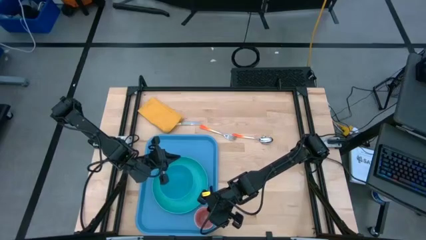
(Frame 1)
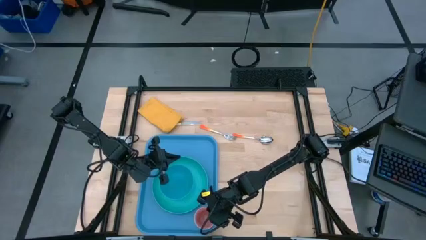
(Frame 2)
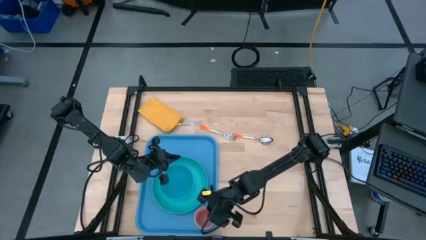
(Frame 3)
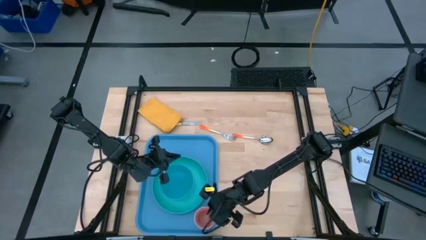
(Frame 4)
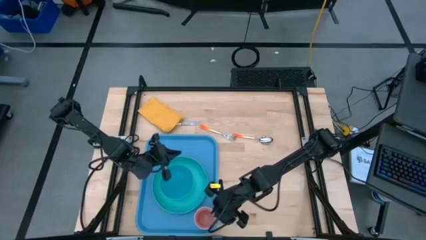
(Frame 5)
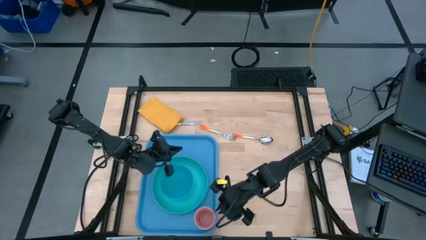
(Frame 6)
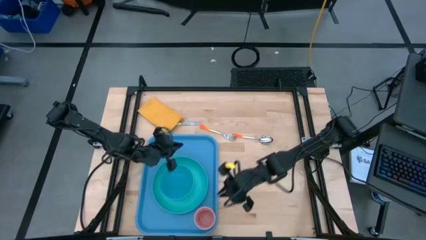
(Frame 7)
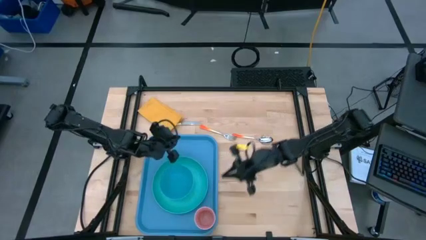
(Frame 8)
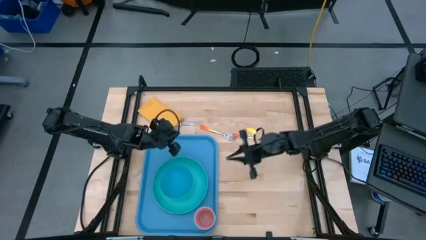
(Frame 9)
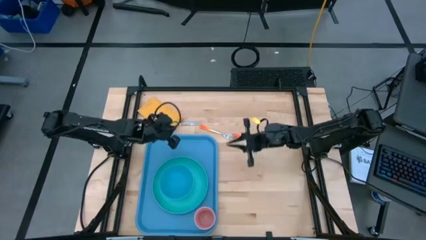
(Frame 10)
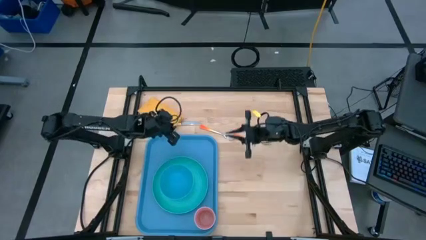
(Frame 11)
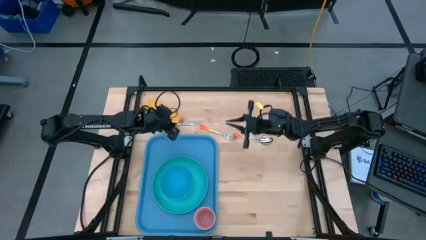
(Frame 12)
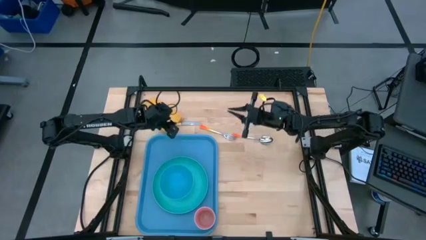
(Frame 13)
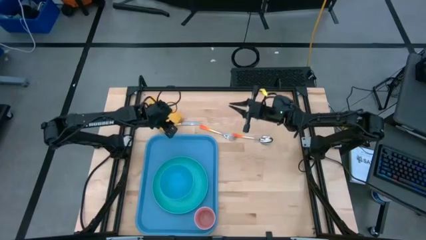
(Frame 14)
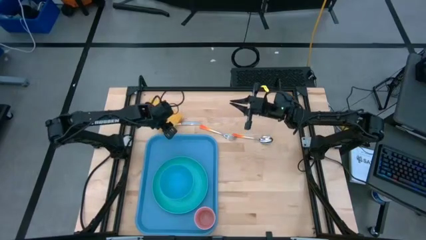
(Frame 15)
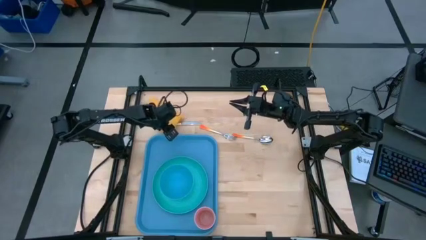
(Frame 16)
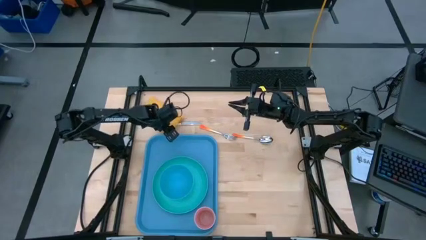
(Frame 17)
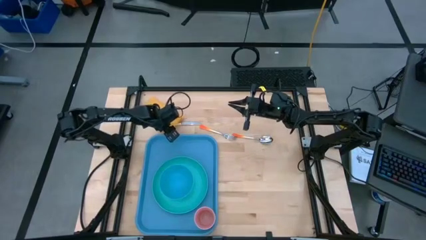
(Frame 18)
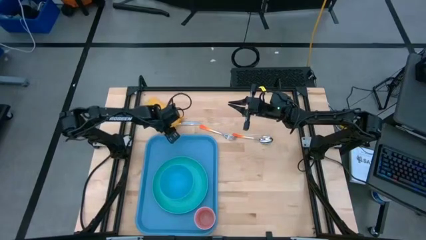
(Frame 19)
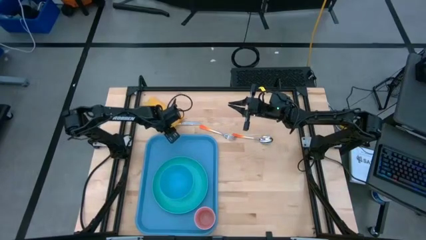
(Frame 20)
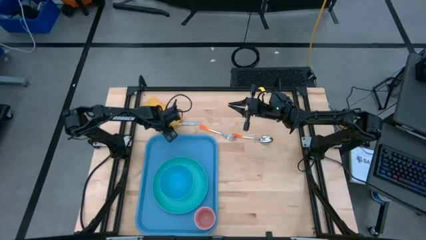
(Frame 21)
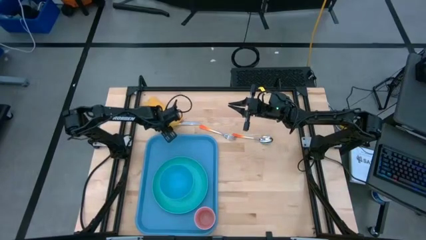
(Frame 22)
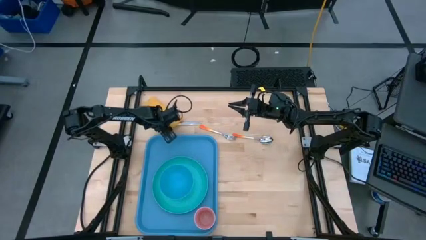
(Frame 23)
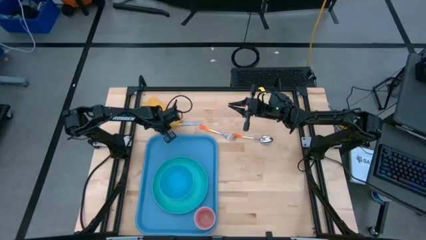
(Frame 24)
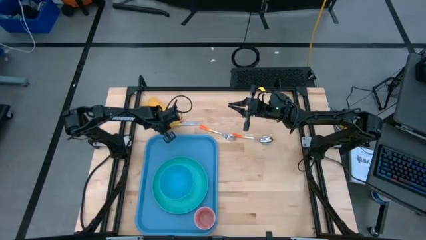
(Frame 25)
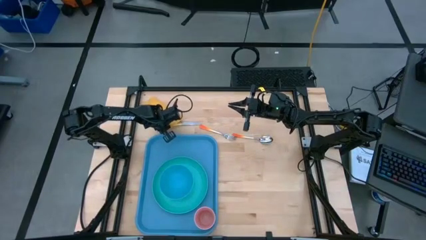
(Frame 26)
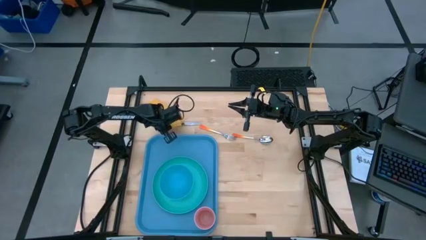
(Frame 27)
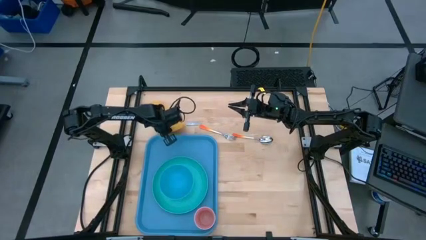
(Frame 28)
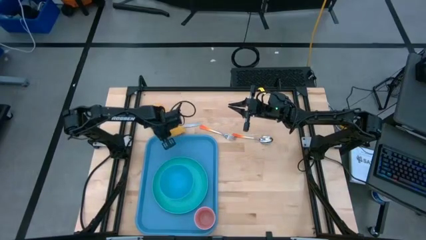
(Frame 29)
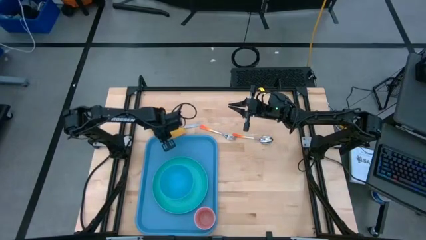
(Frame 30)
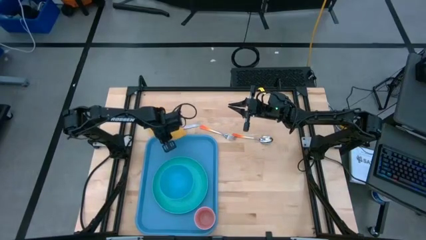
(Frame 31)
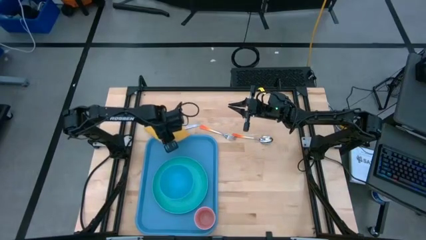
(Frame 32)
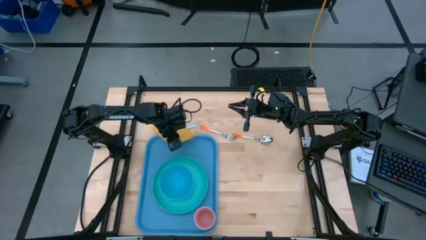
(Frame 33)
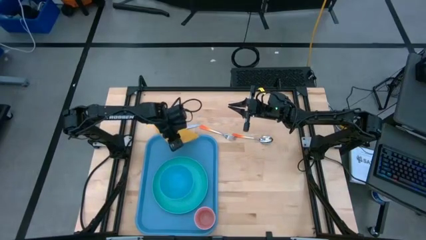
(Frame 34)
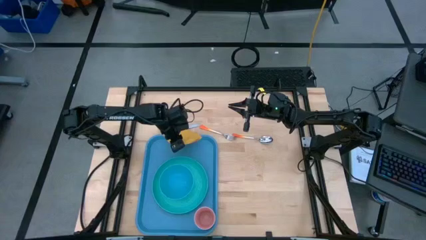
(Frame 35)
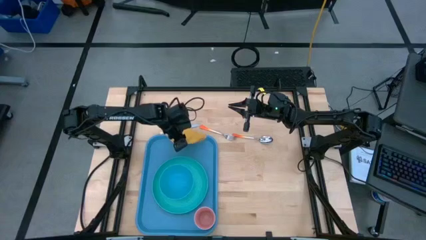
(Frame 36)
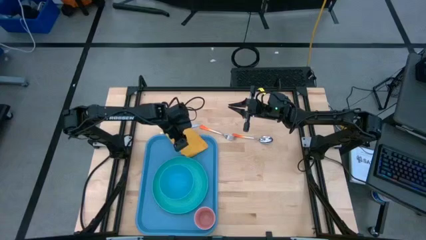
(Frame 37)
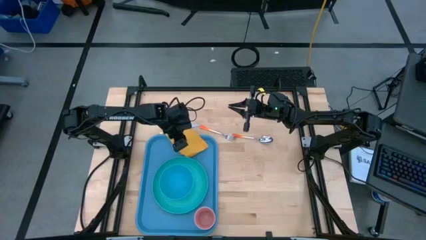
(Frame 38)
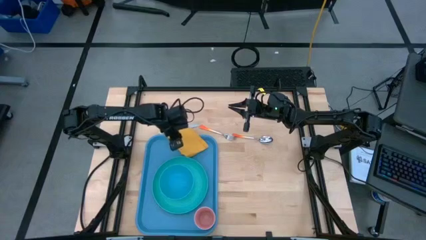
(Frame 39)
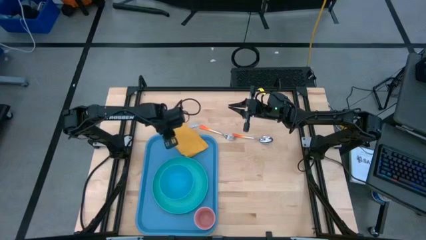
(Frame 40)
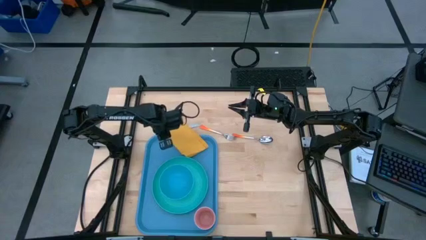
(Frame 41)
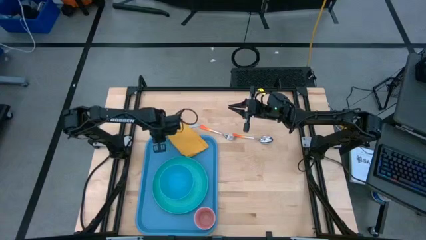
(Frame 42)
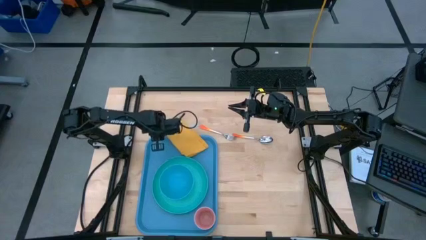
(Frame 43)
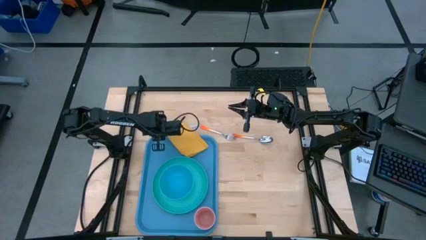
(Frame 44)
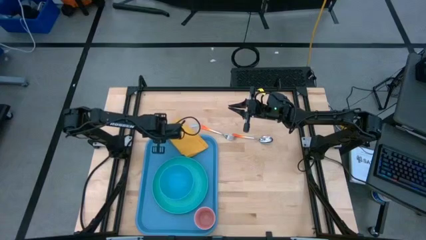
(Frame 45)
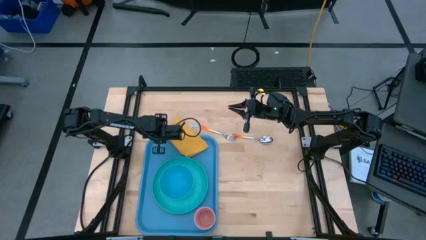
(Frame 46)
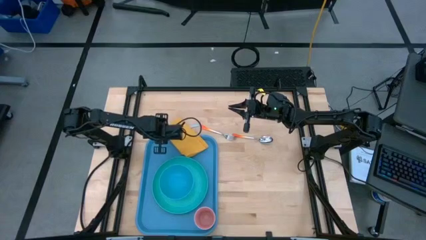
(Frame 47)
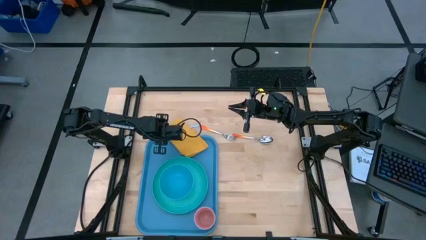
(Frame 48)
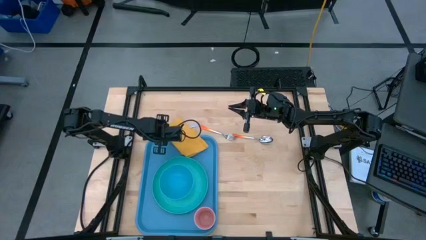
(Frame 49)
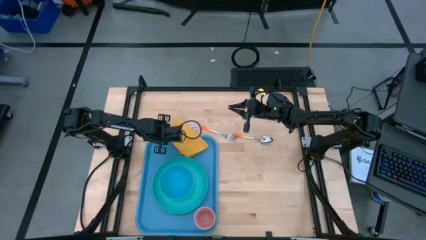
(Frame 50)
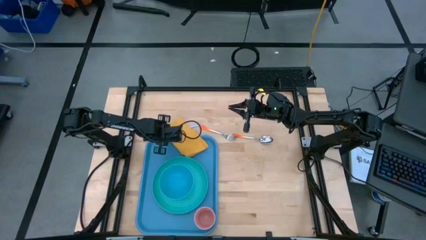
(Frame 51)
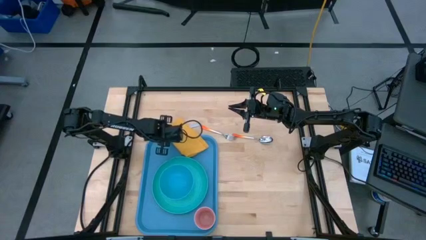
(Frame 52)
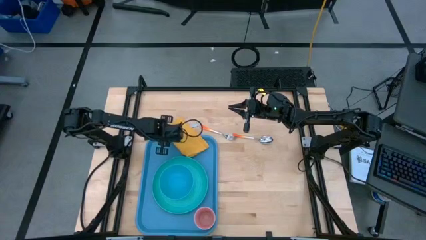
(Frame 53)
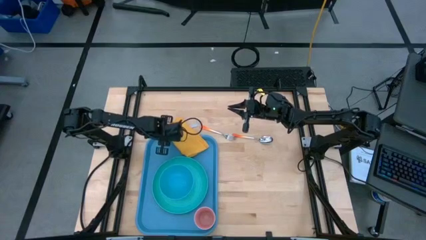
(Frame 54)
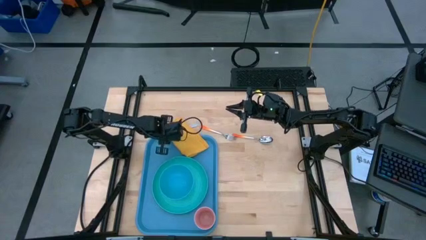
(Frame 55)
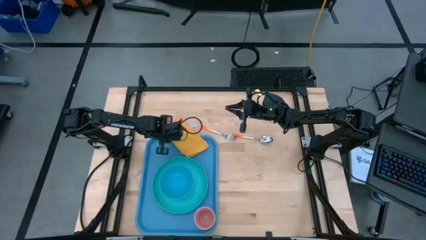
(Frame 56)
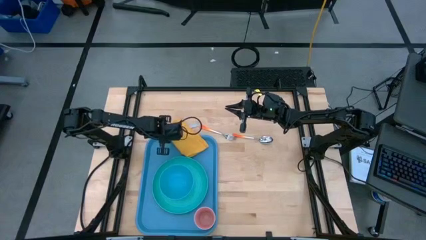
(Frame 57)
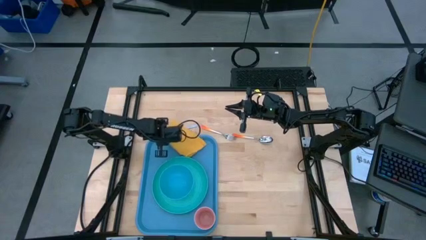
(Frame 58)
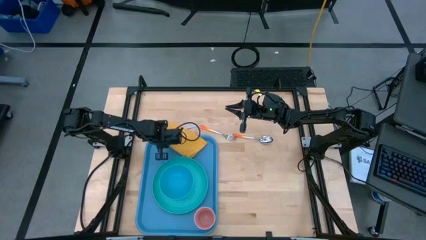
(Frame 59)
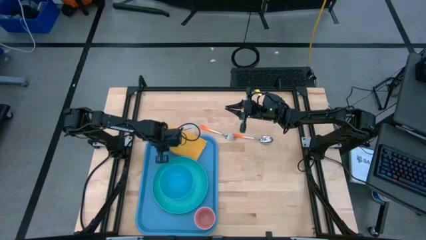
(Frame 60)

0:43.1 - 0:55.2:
Task: Set up tray
Put the yellow napkin to the top of the green plate on the blue serving tray
